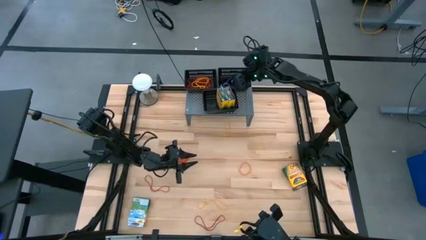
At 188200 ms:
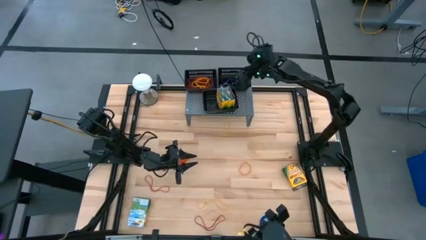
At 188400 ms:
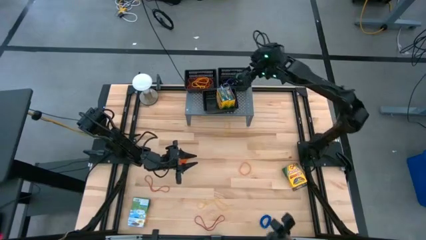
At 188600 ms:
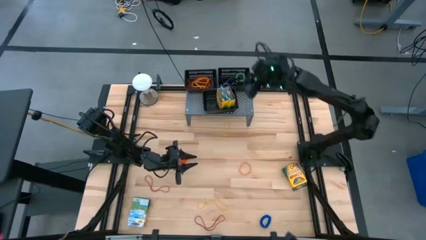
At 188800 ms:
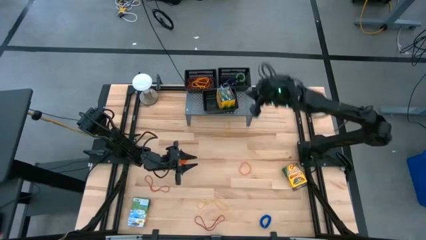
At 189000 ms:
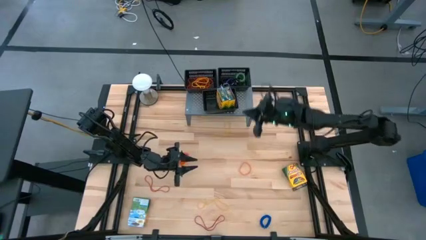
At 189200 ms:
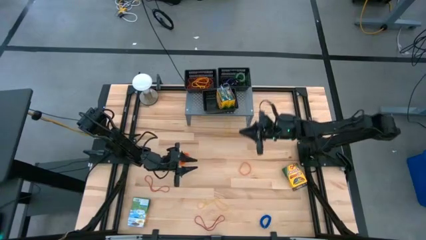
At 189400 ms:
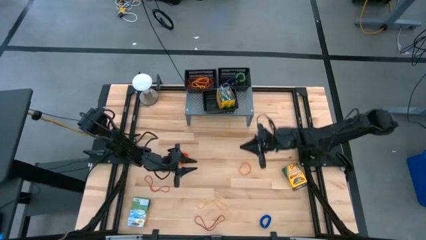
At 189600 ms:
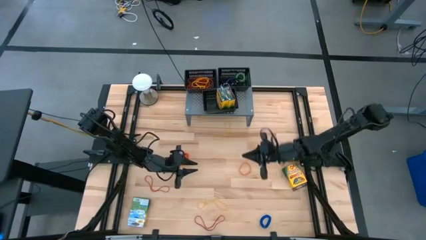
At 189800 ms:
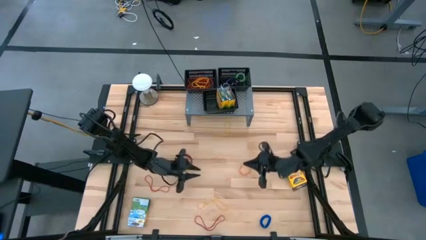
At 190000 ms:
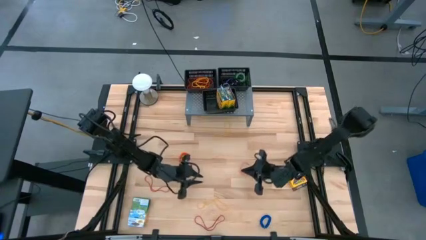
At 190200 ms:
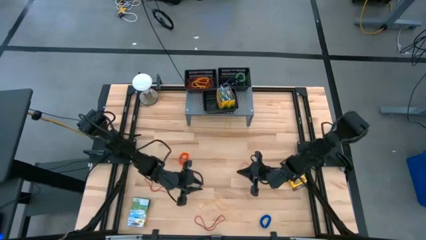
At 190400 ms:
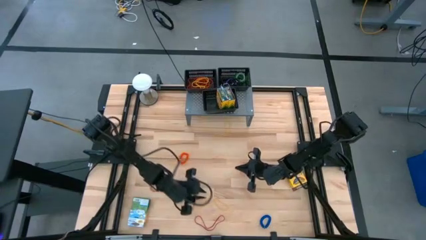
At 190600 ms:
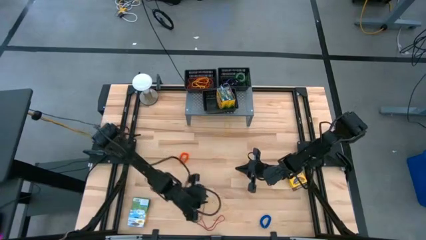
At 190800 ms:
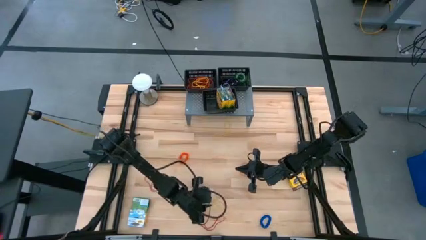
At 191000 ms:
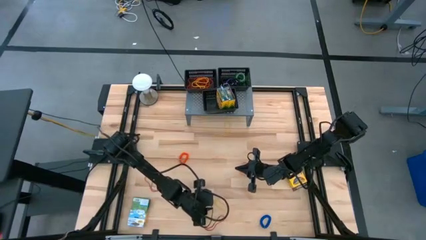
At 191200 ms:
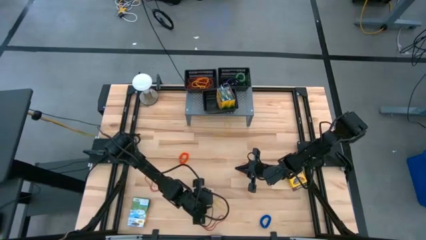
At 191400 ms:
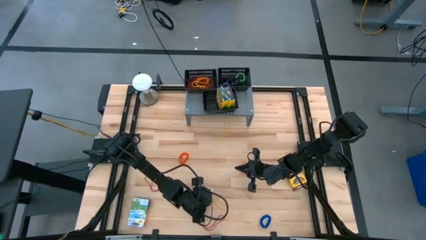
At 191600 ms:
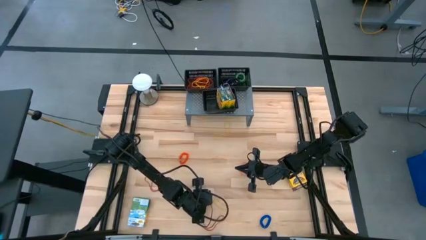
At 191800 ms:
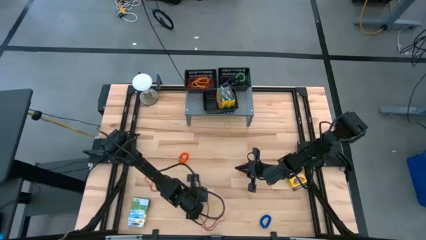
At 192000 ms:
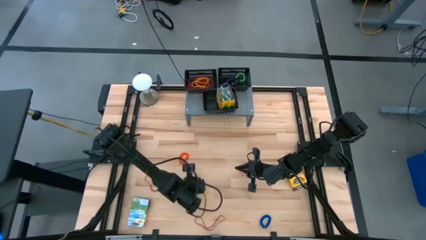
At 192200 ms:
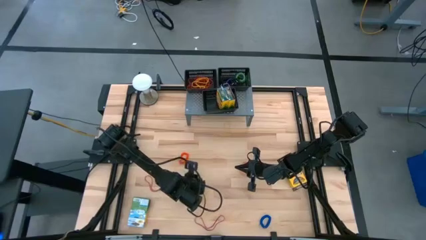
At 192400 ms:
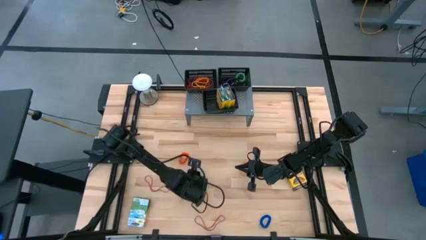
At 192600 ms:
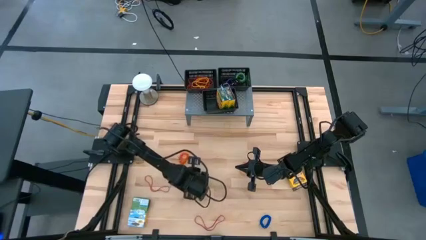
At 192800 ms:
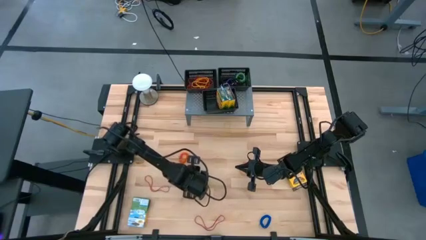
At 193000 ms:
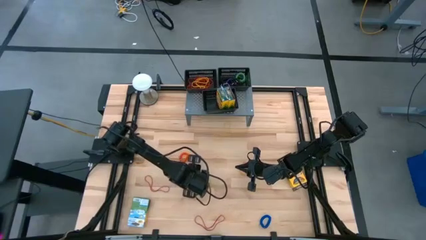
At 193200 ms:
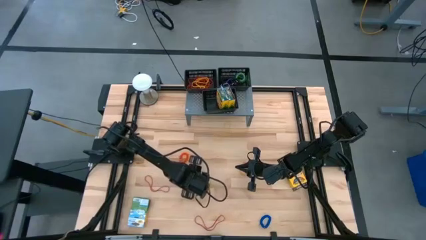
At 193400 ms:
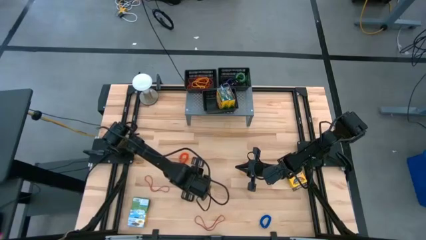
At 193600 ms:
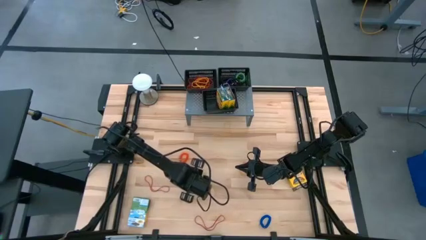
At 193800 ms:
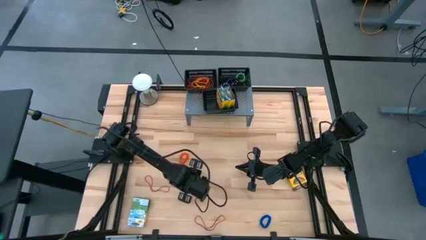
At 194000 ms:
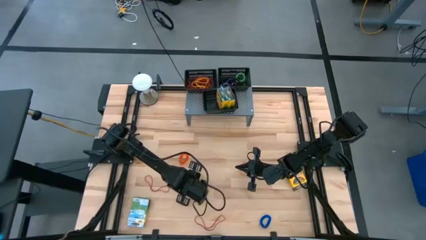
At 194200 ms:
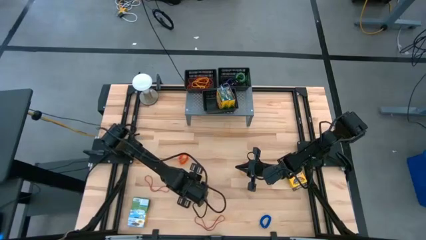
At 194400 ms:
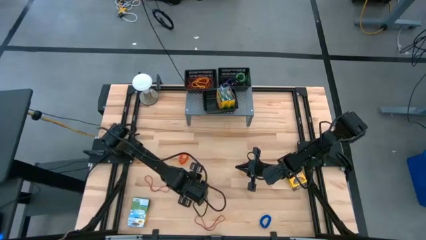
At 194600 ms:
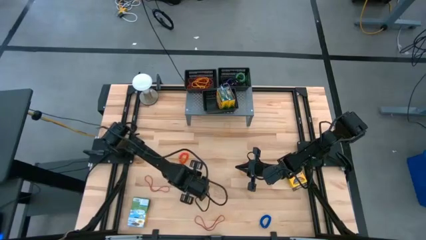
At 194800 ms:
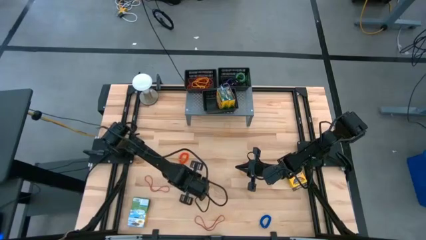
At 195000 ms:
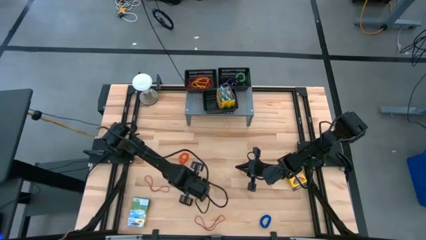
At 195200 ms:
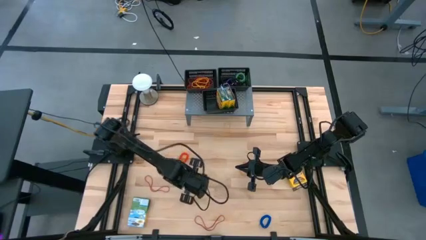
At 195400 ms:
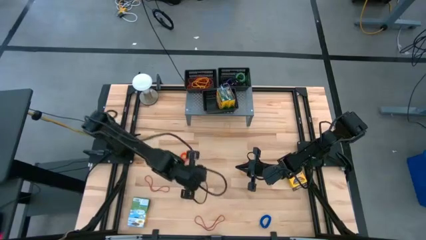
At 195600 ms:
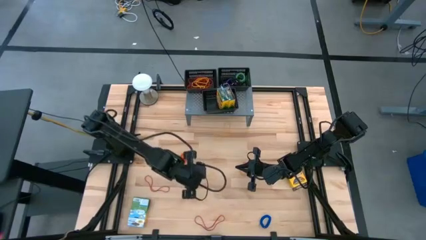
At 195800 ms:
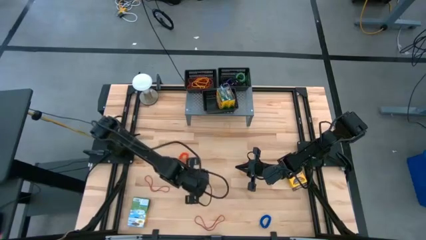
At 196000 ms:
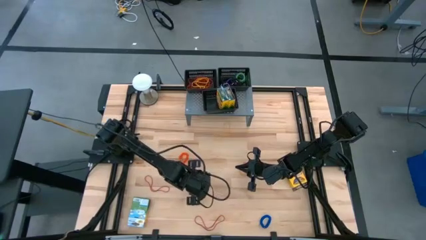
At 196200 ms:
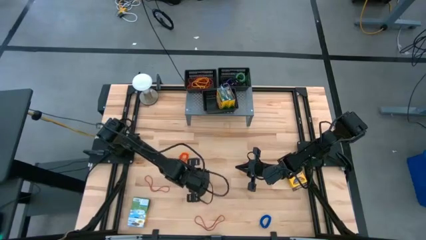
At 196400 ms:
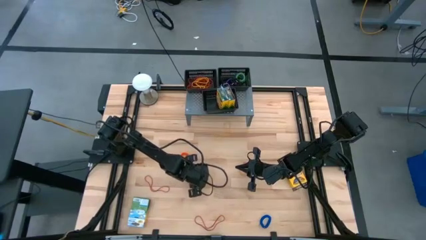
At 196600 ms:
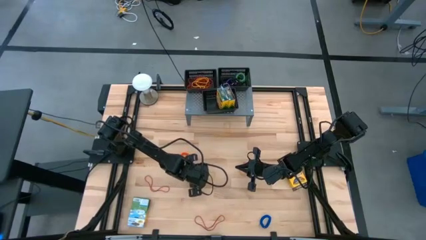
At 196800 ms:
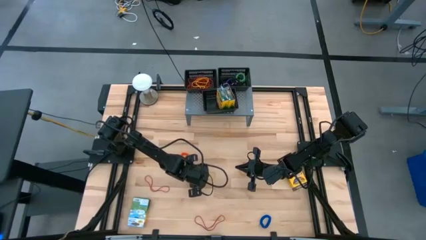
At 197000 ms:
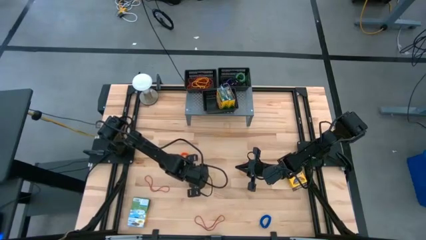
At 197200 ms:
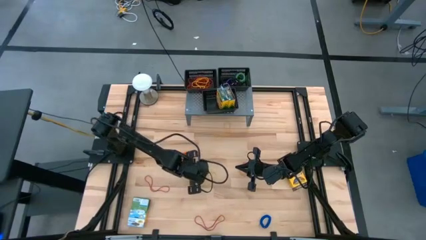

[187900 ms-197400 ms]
Task: Pick & Place Office Desk Supplies
Put the yellow rubber band into the top left black basket on the shelf

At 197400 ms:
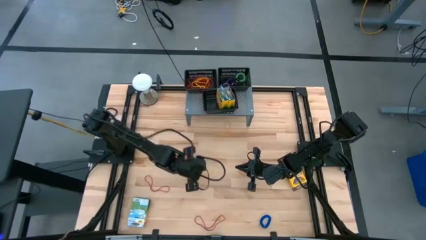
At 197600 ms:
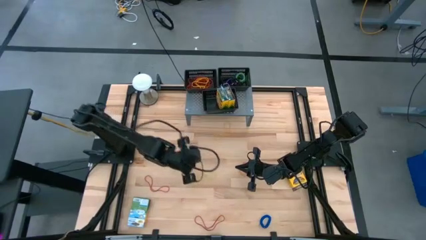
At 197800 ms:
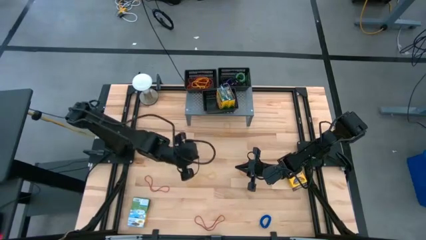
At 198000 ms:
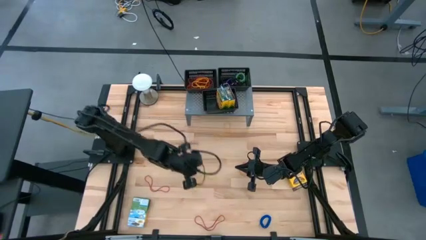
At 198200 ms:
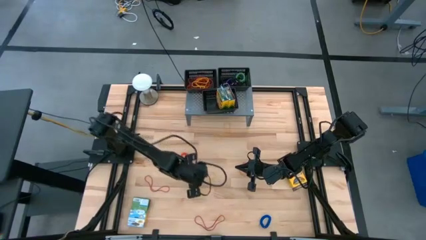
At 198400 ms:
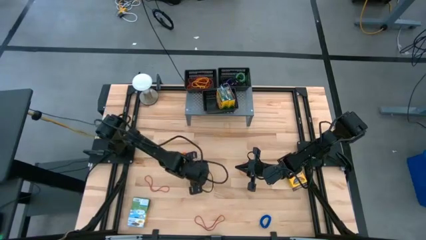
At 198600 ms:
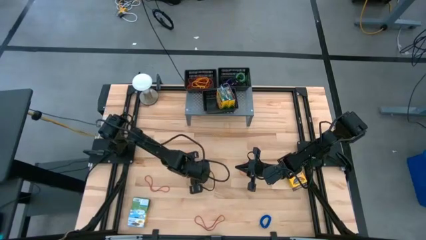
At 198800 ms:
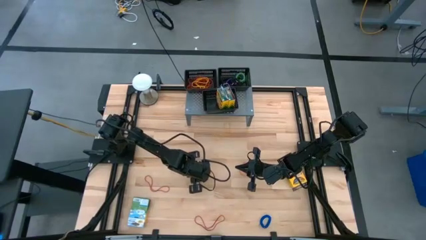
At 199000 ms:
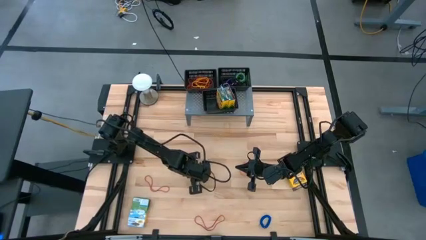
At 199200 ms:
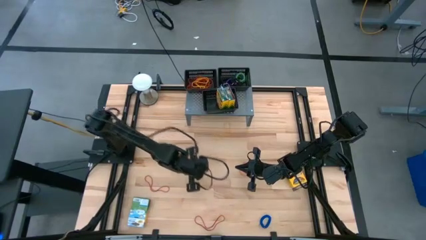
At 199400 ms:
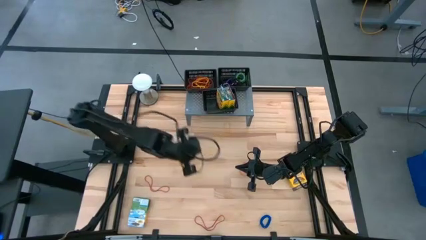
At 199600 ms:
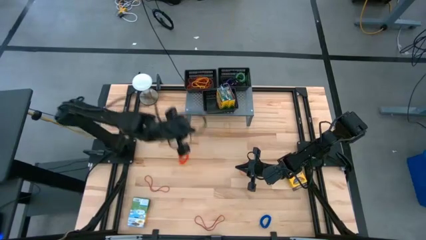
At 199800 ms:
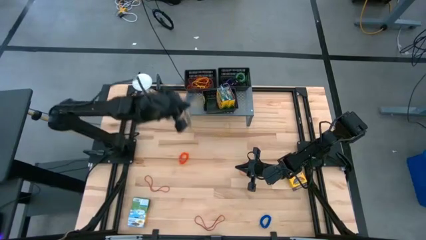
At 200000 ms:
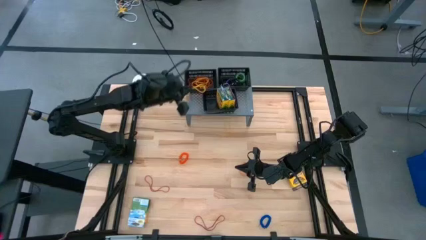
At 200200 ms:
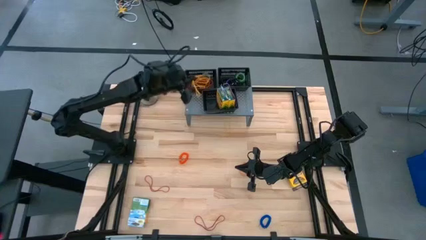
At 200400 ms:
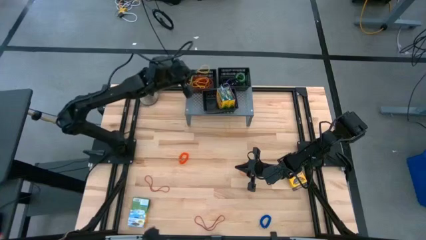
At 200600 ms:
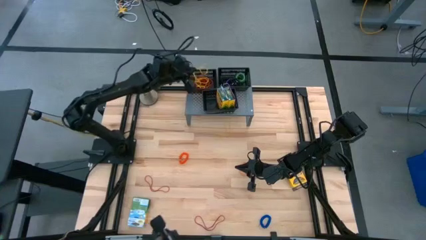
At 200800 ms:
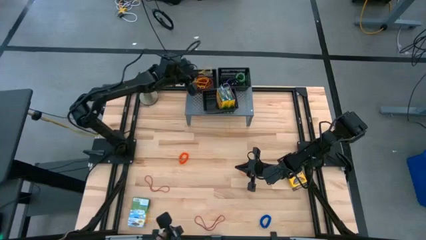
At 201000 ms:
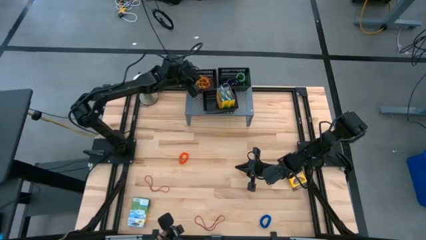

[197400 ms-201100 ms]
Put the yellow rubber band into the top left black basket on the shelf
